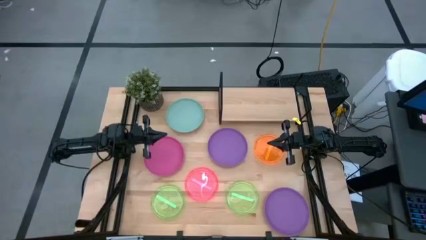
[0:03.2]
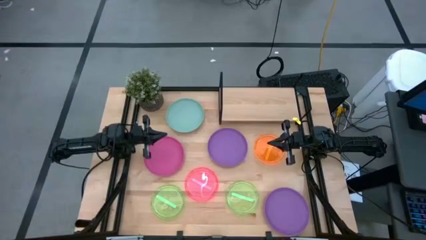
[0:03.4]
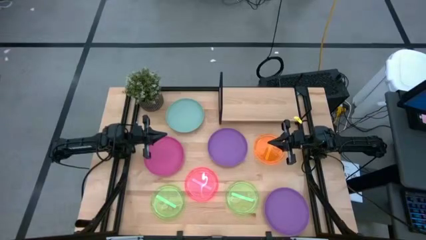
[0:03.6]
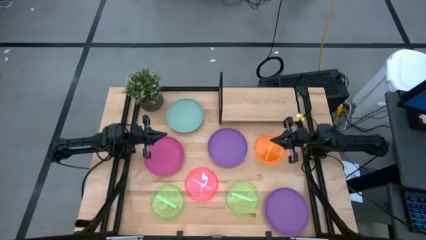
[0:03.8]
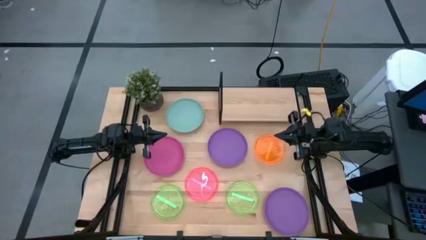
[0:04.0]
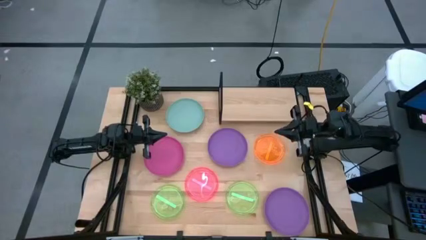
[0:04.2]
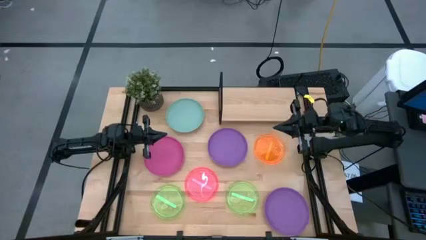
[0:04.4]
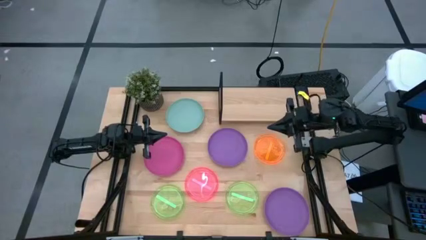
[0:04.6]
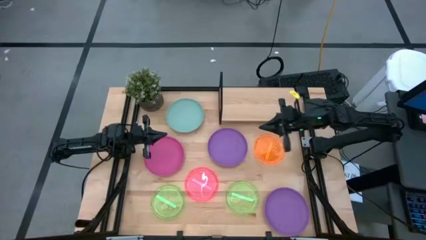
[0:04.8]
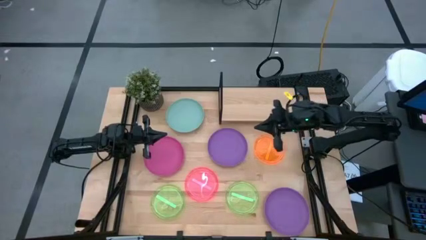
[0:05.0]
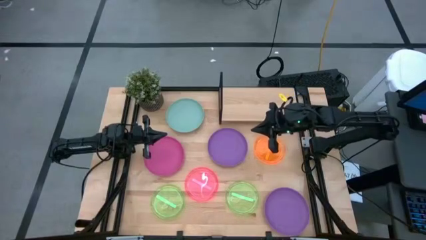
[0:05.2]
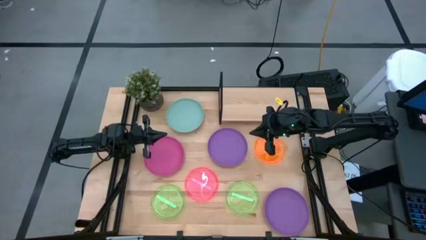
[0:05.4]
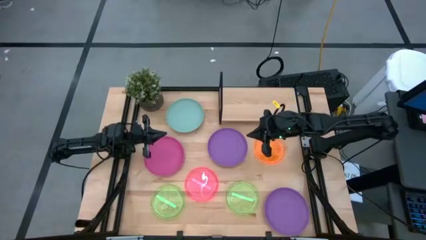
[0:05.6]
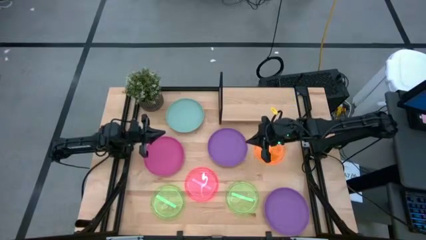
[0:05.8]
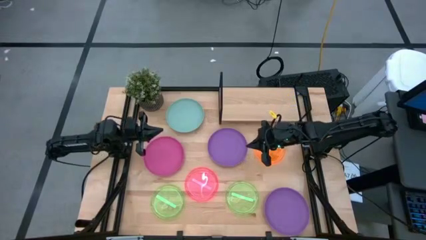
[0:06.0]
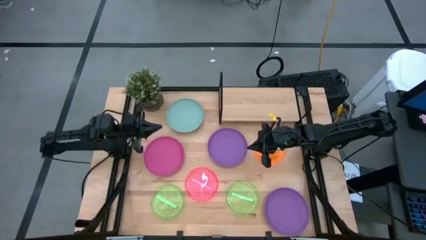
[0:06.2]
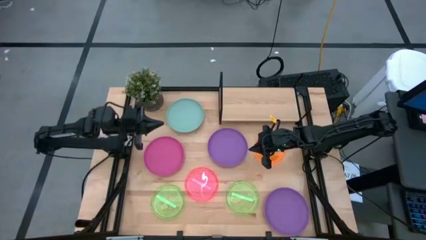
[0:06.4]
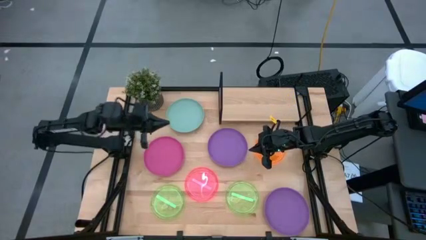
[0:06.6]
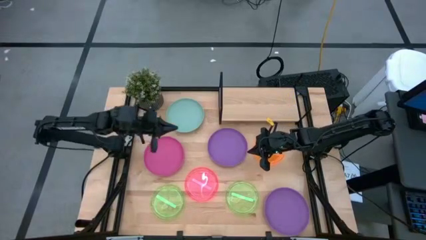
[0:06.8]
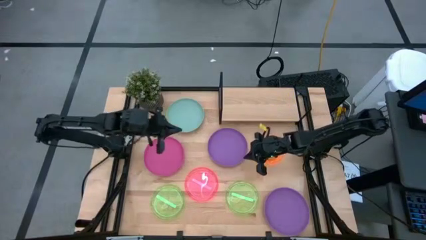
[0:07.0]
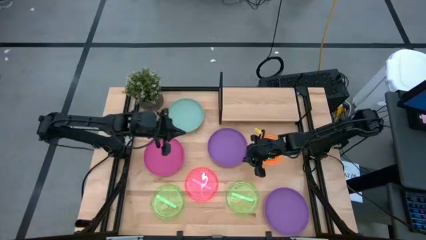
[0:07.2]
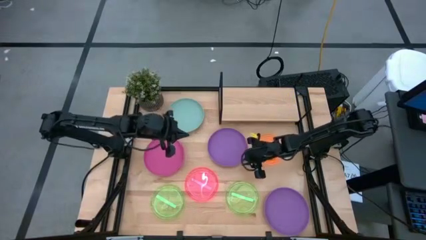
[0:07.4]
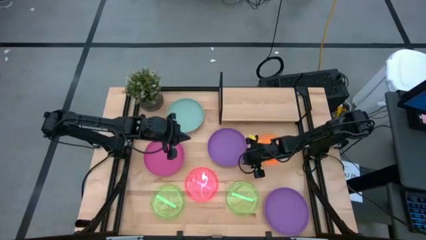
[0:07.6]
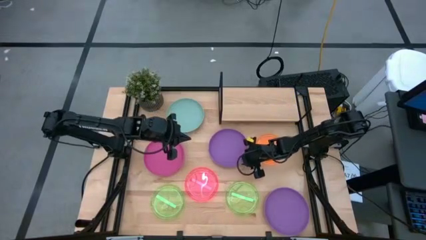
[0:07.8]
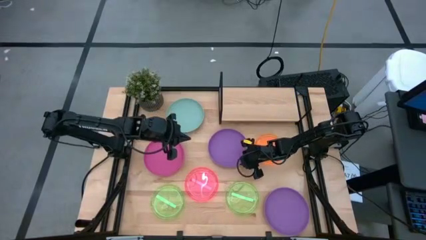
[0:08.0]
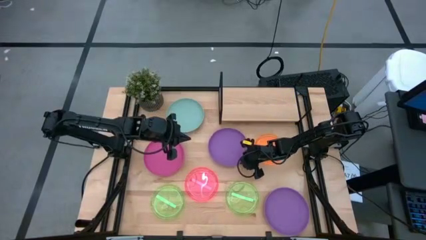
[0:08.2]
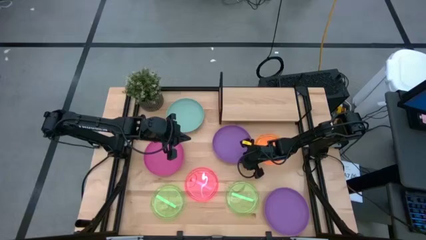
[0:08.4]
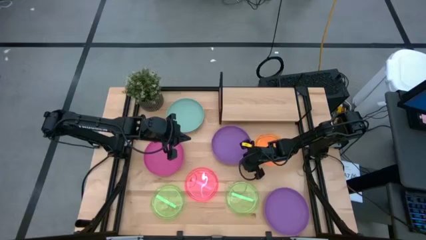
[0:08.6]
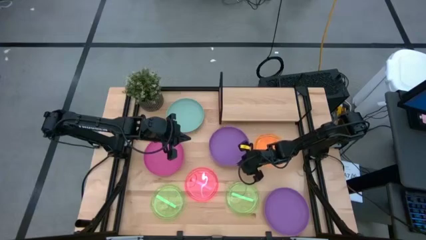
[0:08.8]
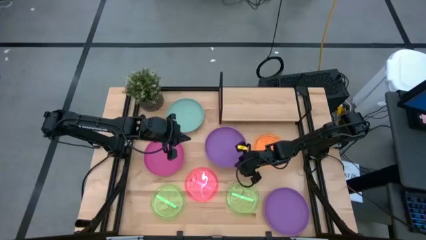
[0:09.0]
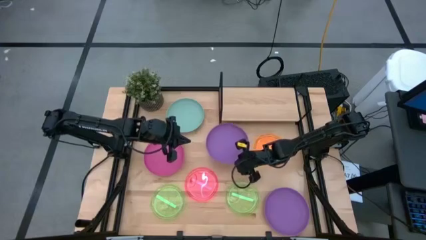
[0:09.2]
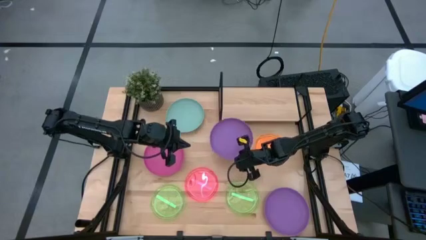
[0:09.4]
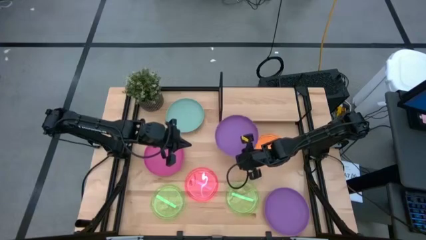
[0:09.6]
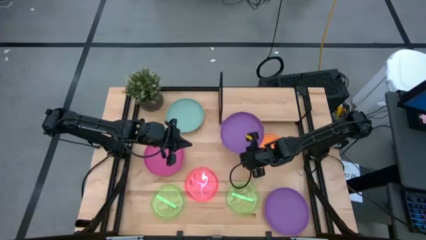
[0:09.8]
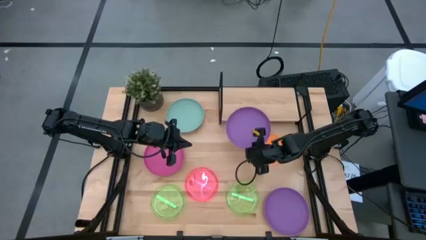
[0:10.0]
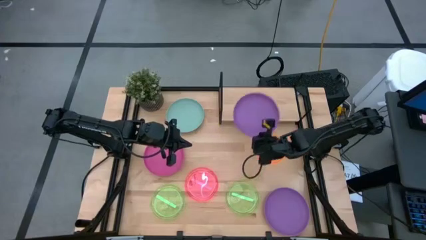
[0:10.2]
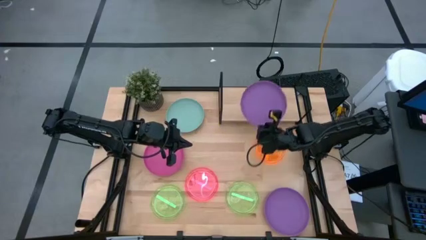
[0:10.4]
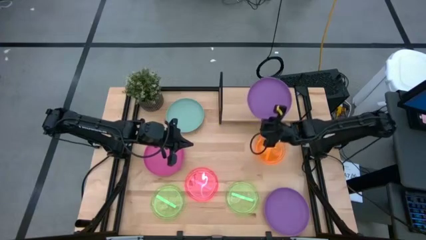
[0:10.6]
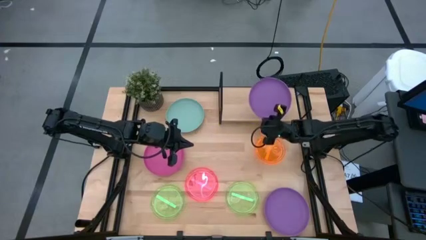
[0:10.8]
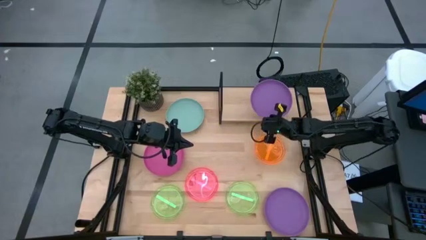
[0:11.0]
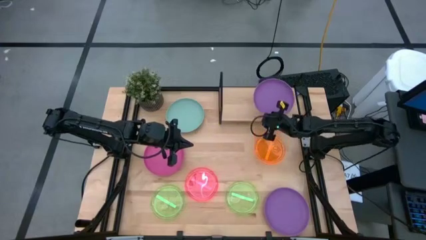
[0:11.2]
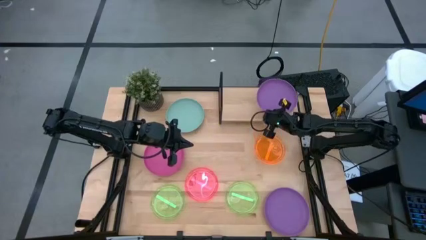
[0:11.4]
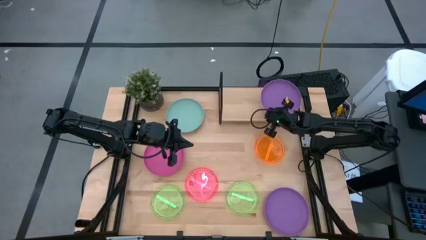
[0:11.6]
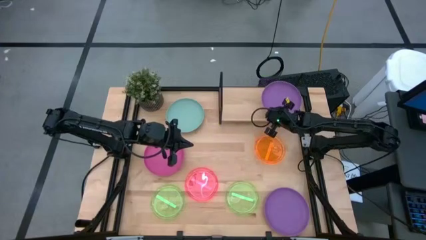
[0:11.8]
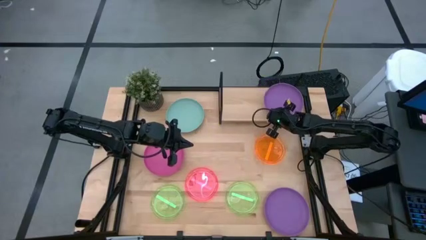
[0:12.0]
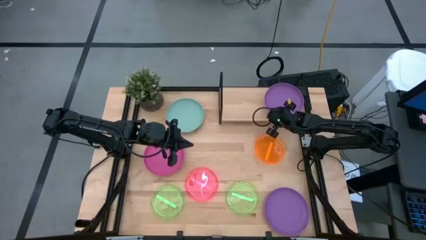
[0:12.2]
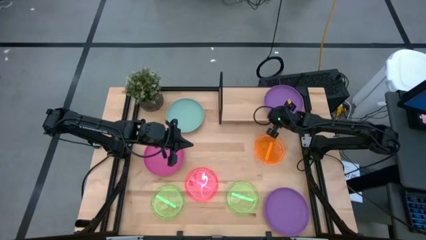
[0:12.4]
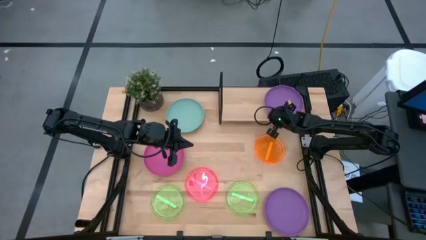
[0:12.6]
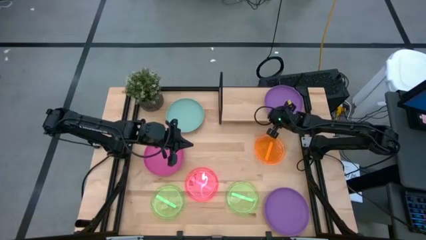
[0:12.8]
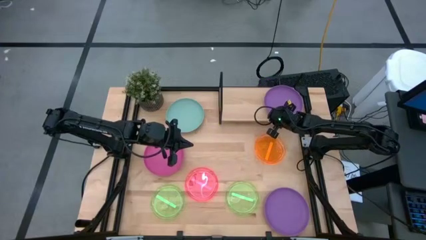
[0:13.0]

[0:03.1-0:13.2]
Task: Place and stack plates onto a shelf
Put the top big violet plate on the shelf

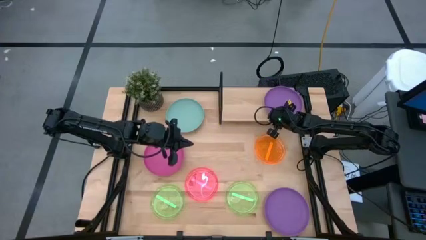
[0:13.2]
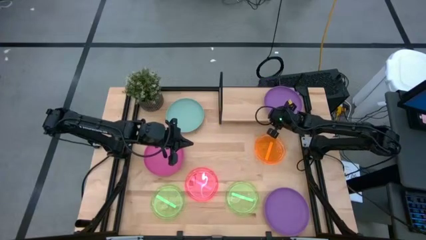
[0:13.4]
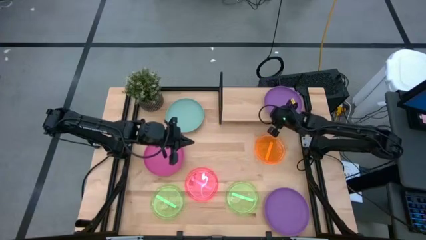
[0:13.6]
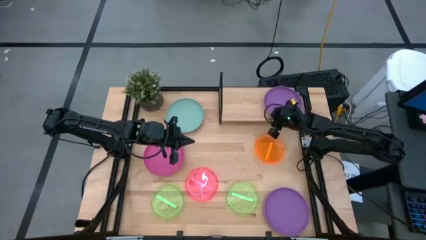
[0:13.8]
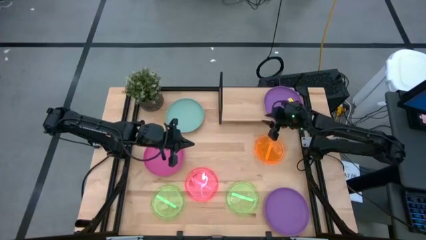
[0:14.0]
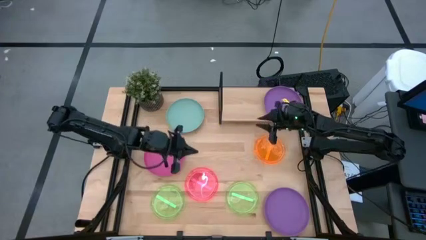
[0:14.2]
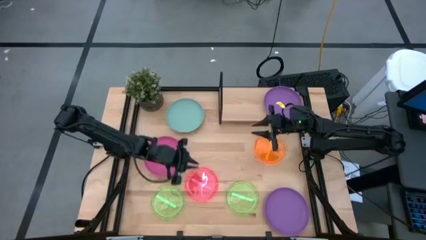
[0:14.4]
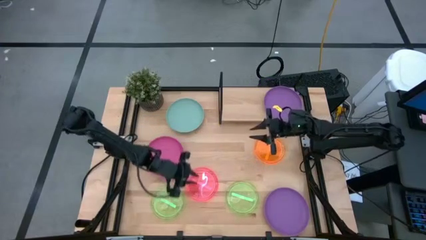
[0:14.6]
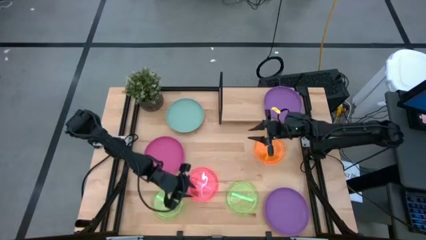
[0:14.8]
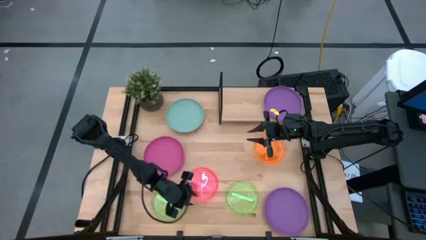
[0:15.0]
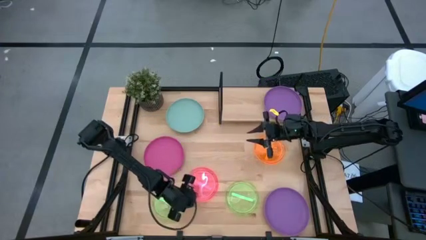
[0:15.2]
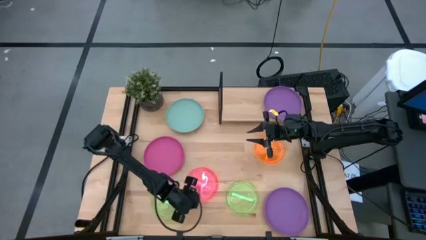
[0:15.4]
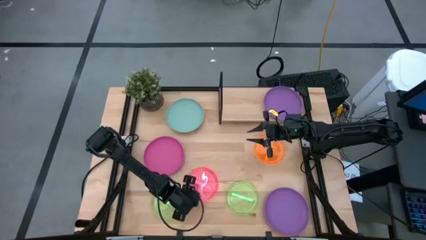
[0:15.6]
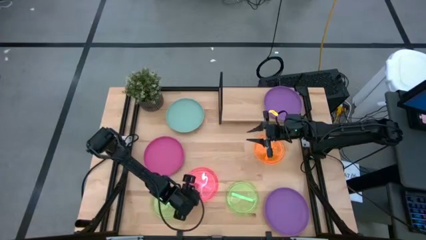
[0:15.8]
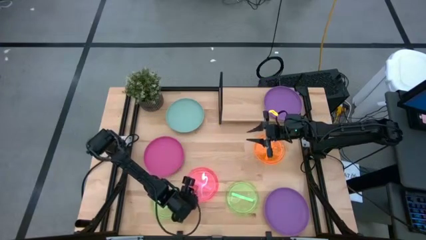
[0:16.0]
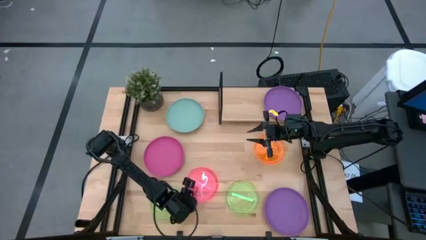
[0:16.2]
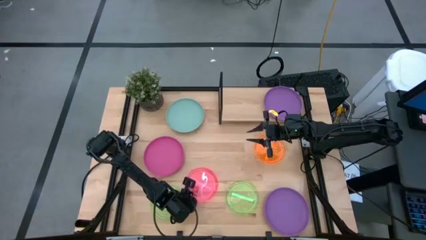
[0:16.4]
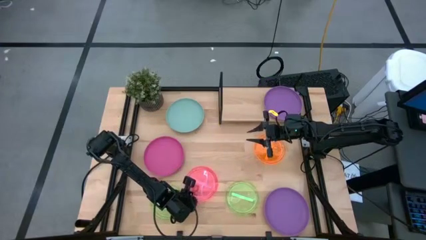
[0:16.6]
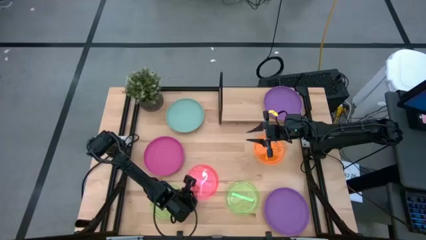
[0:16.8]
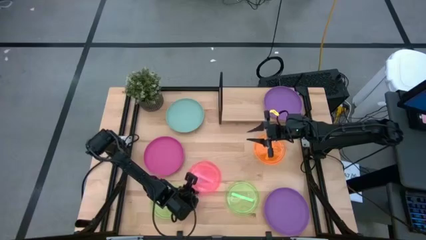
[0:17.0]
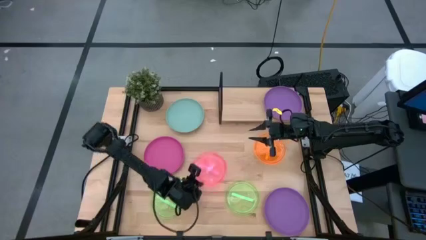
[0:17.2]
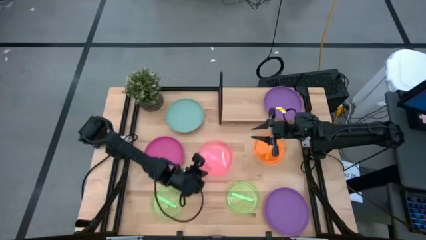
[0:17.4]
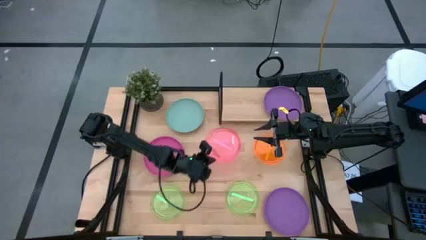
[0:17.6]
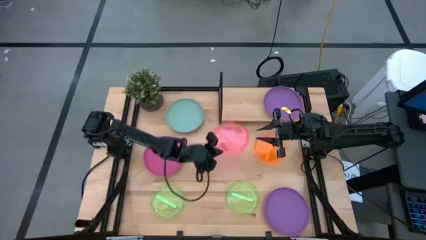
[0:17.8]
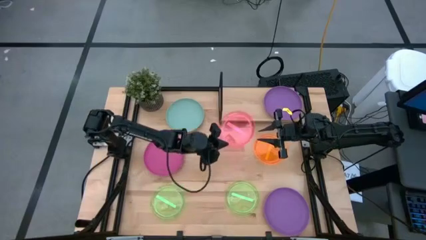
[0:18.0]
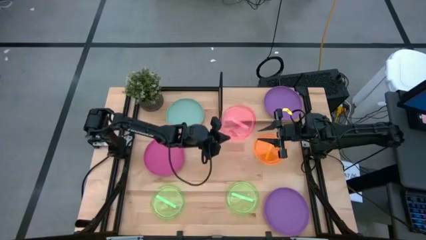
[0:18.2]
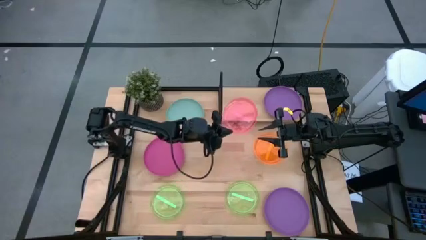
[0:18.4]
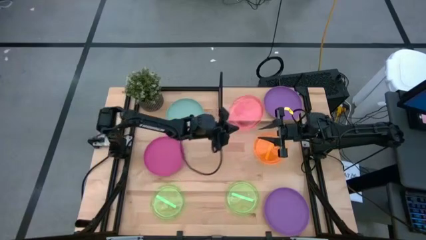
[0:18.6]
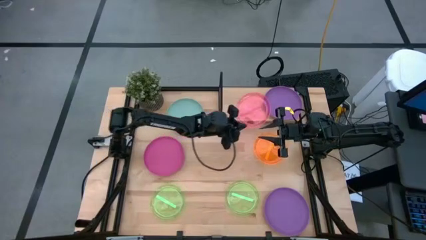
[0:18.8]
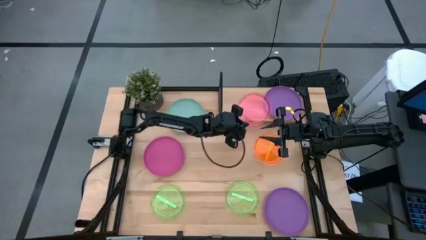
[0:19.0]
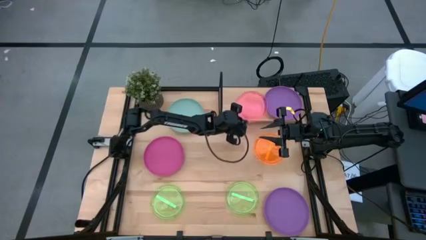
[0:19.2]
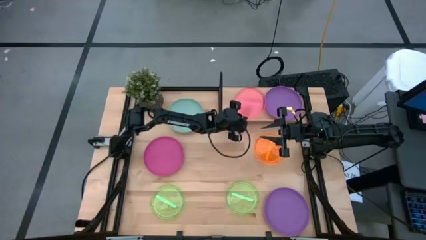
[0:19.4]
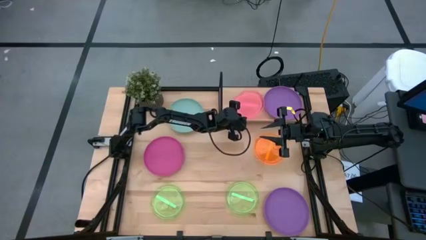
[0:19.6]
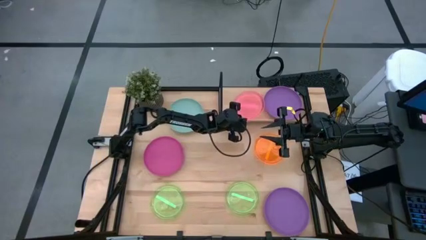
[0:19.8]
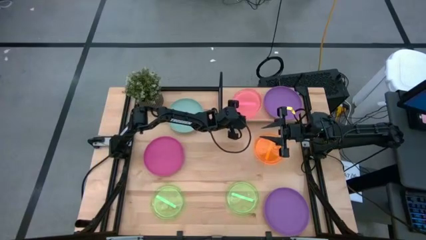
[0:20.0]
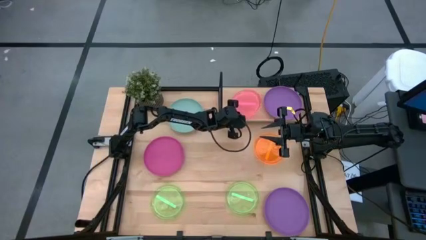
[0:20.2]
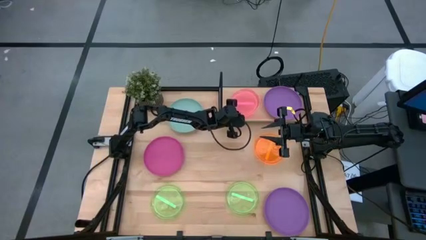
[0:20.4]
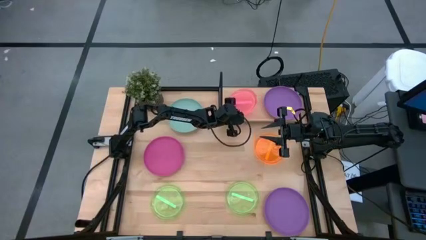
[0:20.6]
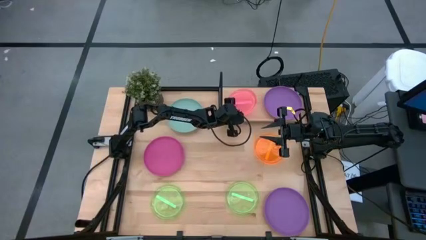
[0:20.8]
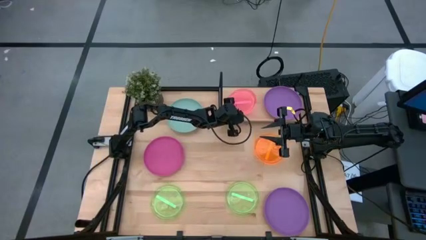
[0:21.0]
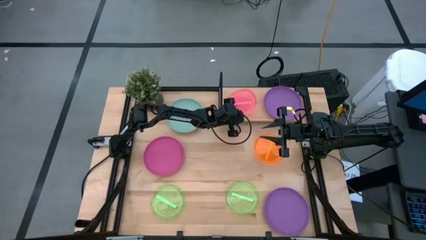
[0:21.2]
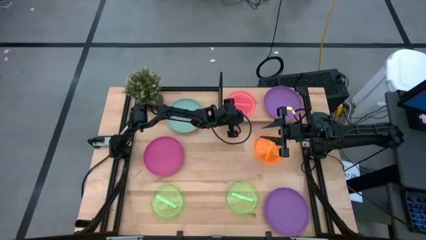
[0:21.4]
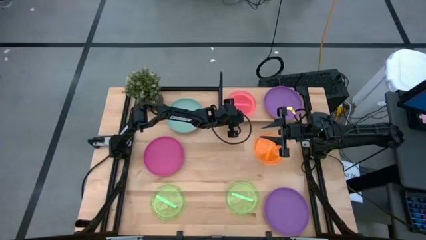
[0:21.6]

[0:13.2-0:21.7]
Put the small pink plate on the shelf
